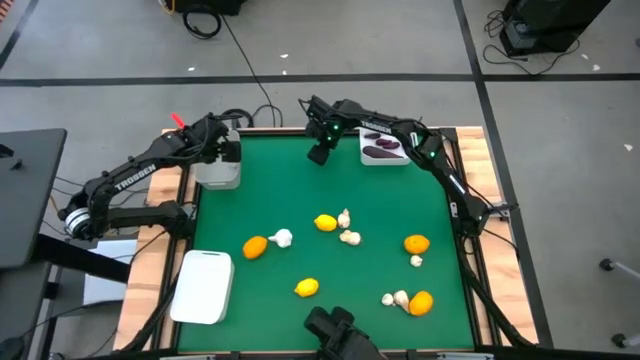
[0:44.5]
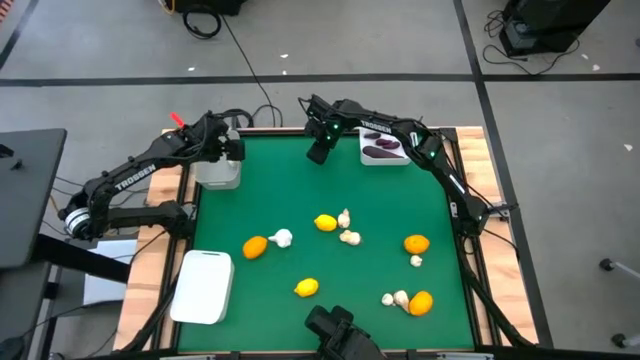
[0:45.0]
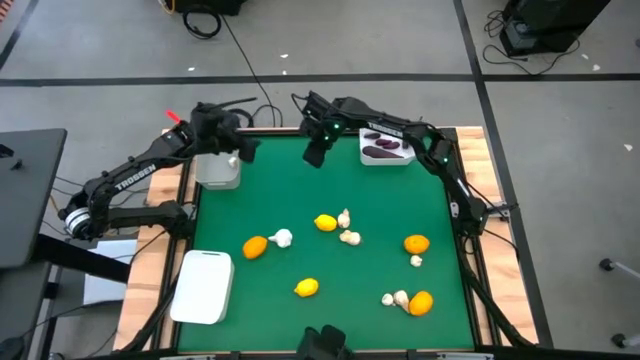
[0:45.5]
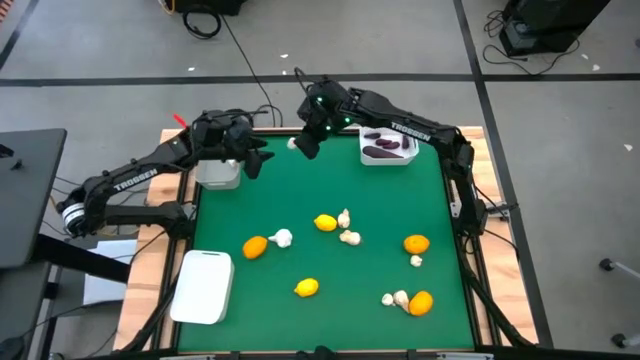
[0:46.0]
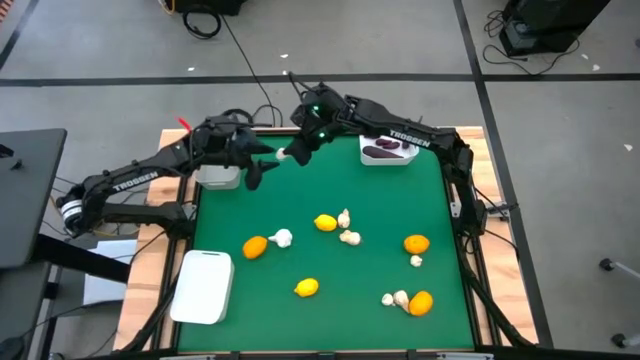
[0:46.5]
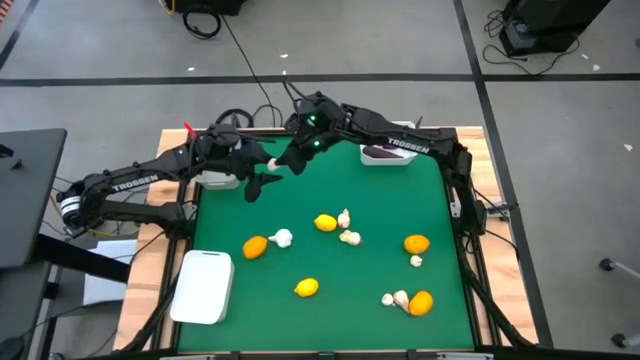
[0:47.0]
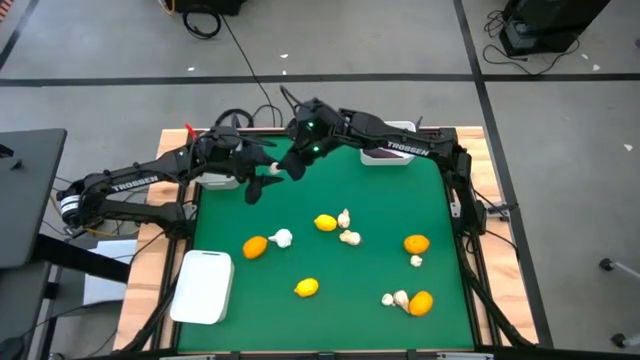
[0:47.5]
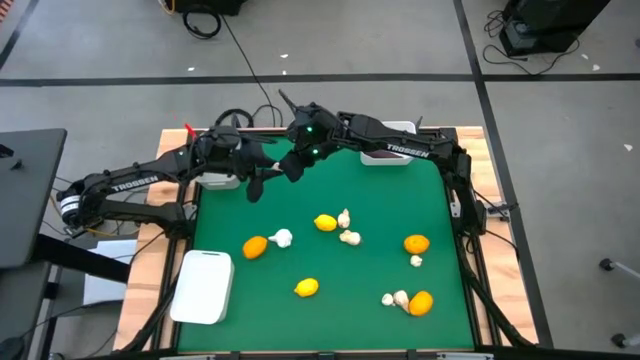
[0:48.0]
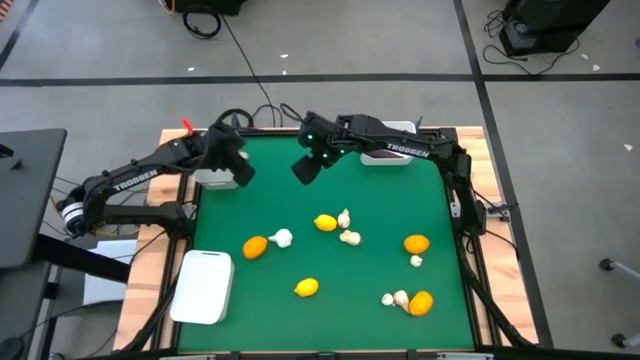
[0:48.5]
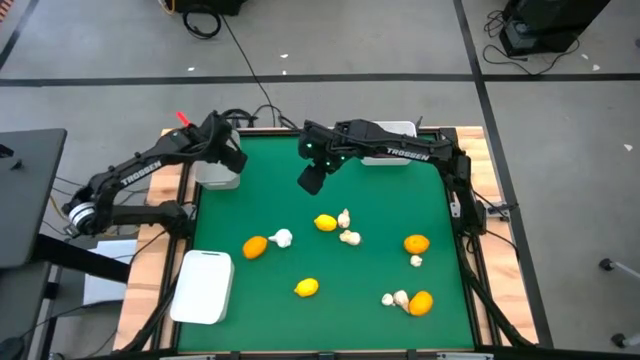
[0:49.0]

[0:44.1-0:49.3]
Task: Sort produce into baskets
Put the garlic into the gray bin

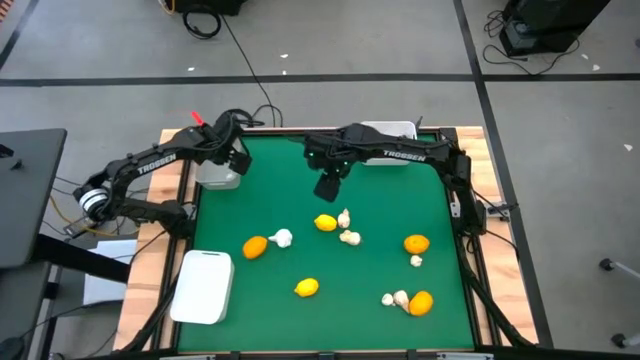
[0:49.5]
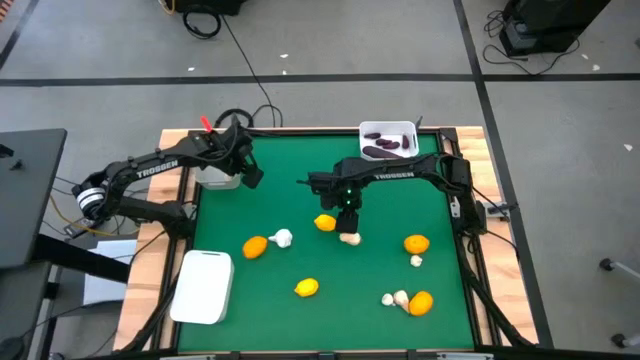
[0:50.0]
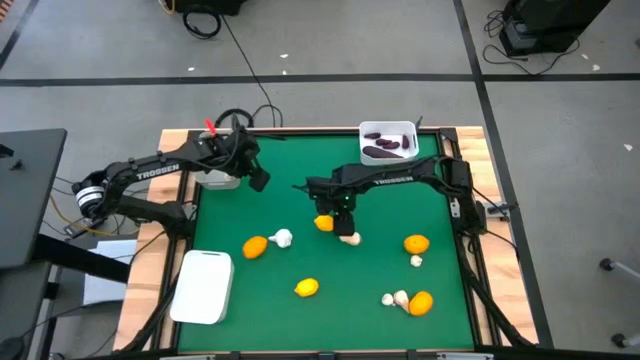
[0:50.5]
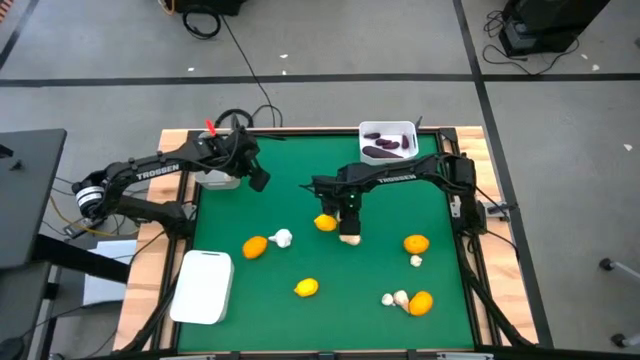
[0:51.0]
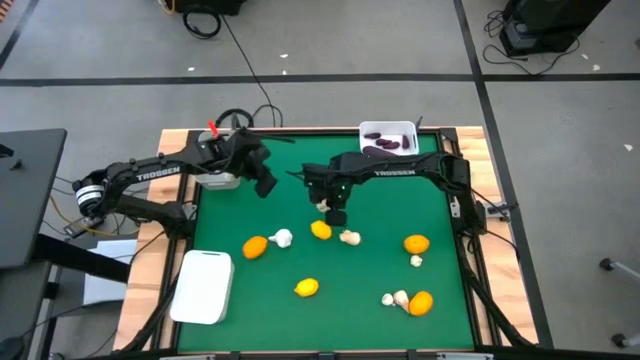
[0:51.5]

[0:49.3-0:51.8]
Put the garlic into the gray bin

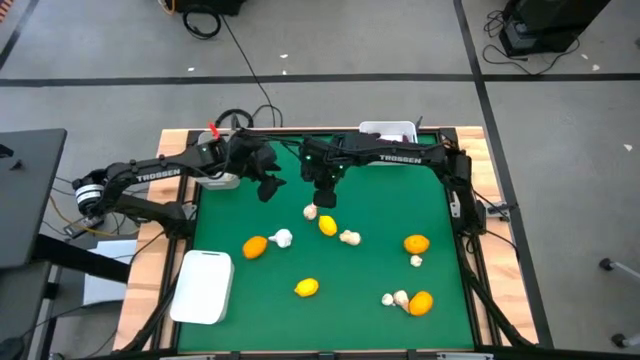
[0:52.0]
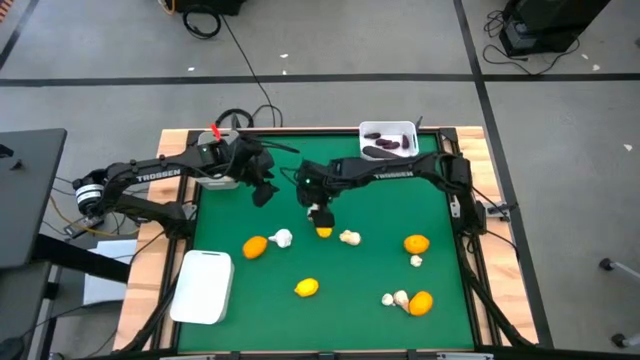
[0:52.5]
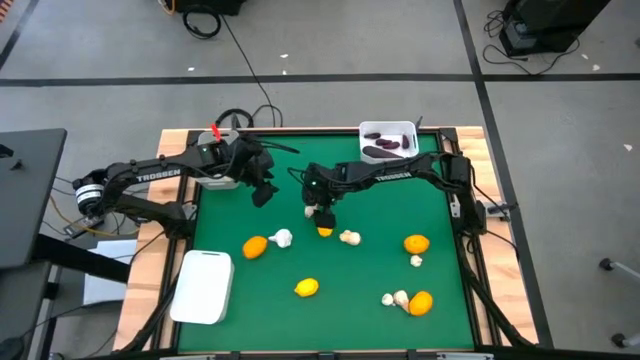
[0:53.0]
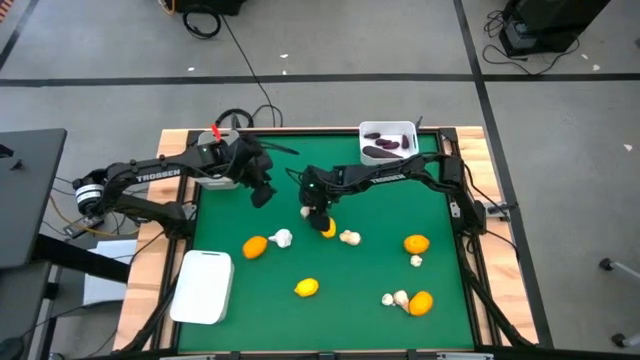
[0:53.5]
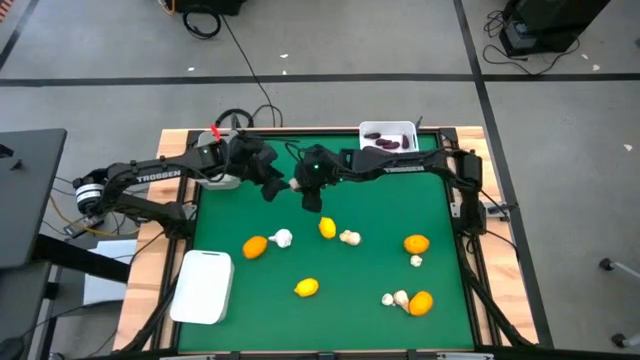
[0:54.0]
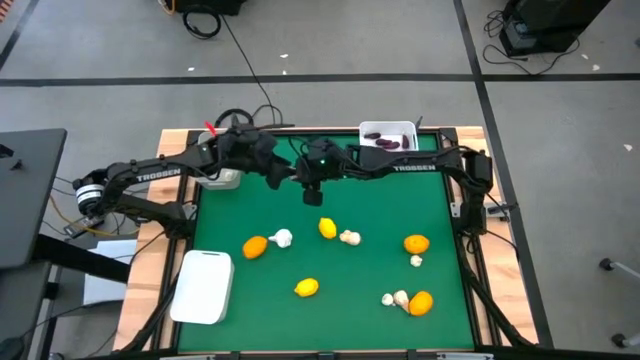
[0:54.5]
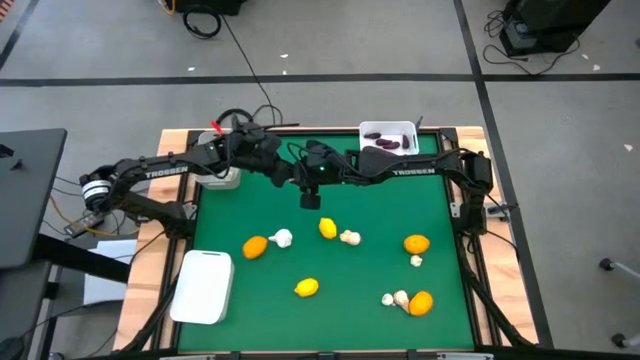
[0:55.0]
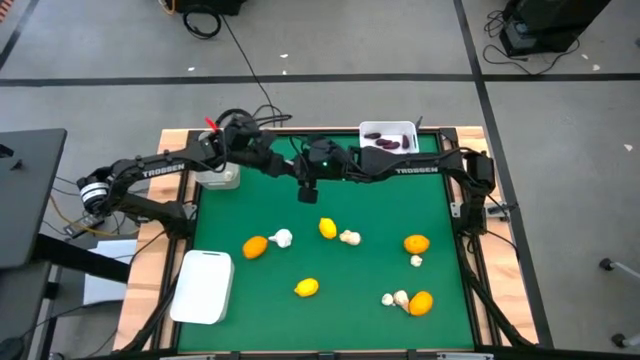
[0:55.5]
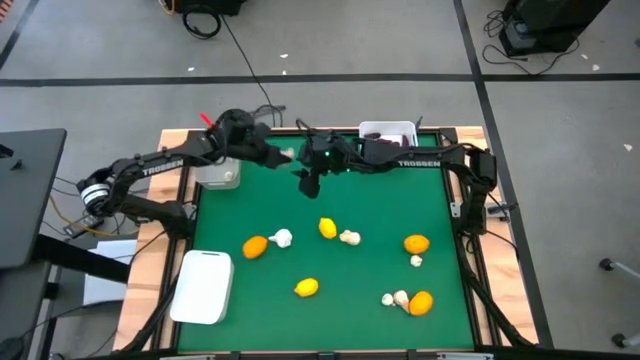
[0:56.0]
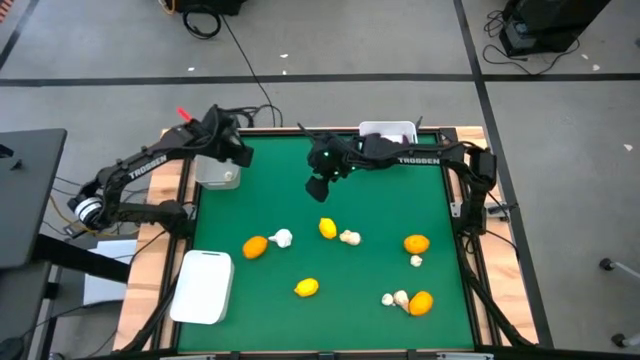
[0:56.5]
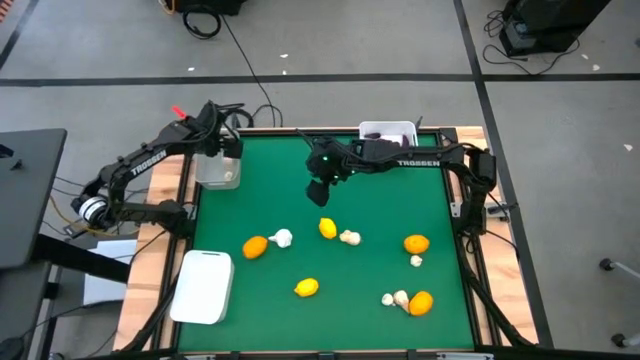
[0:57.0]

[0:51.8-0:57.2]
Put the garlic into the gray bin

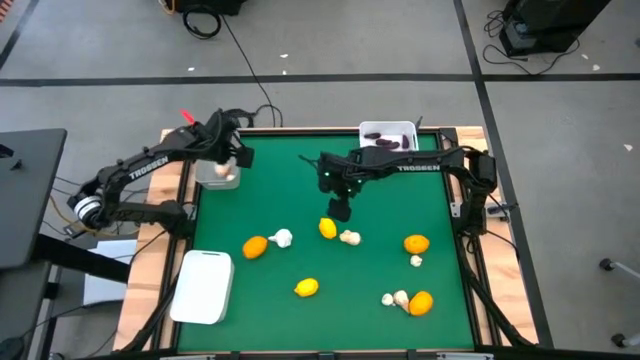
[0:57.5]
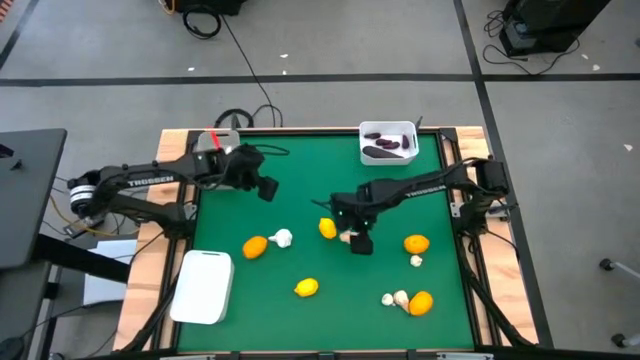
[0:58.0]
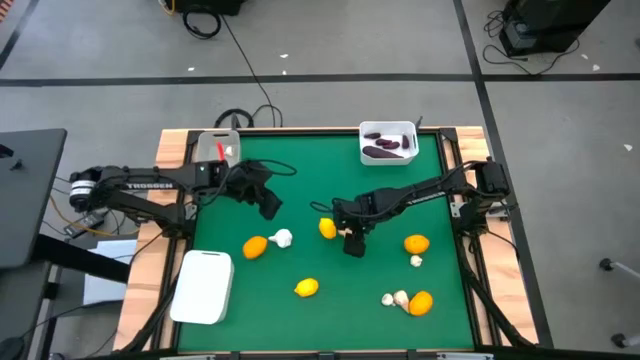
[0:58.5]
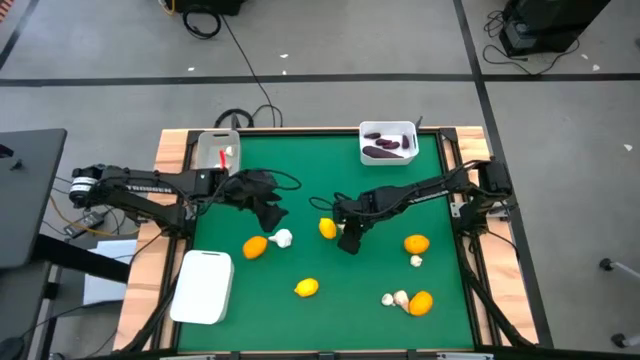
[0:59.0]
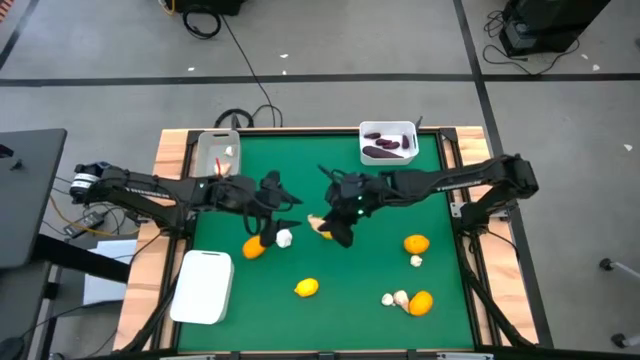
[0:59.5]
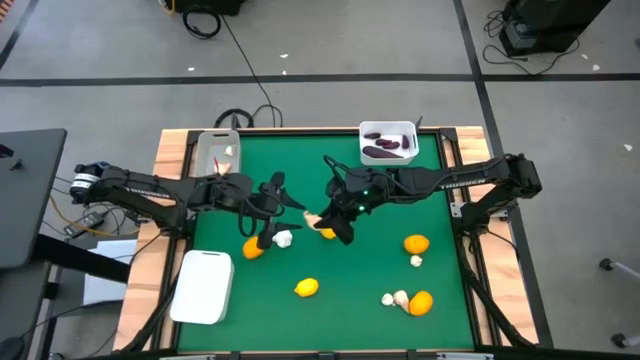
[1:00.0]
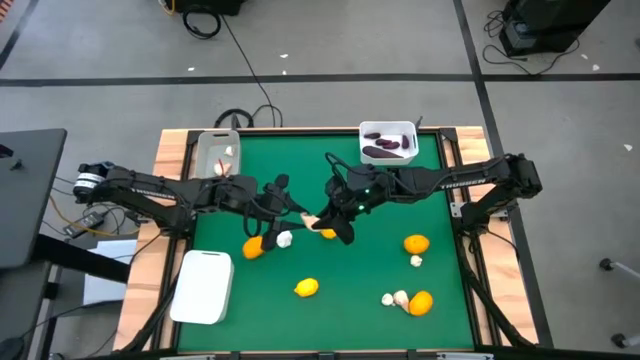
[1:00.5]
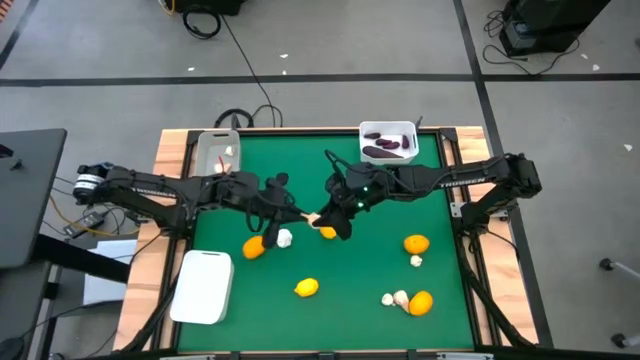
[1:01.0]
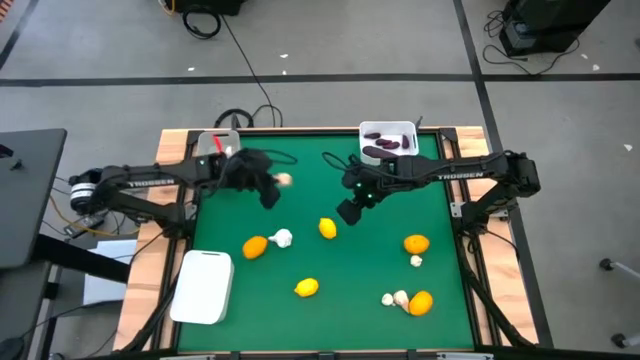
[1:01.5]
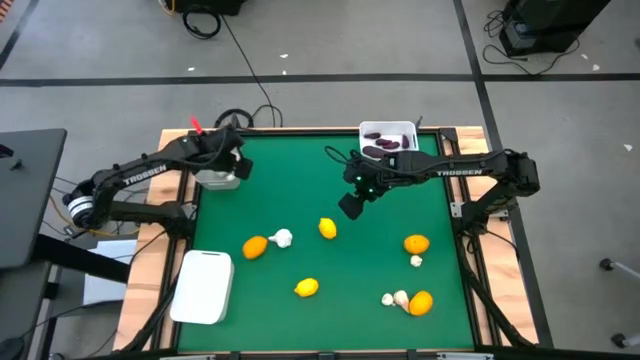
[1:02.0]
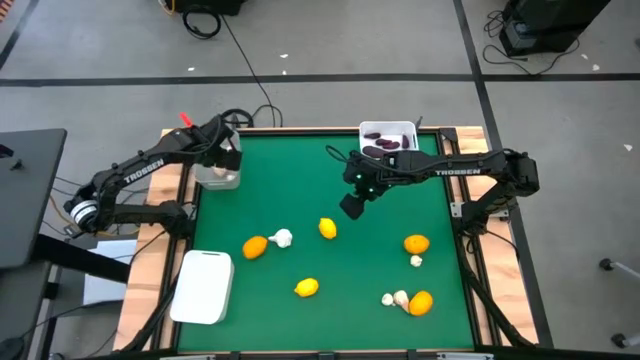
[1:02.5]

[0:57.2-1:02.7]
Put the garlic into the gray bin

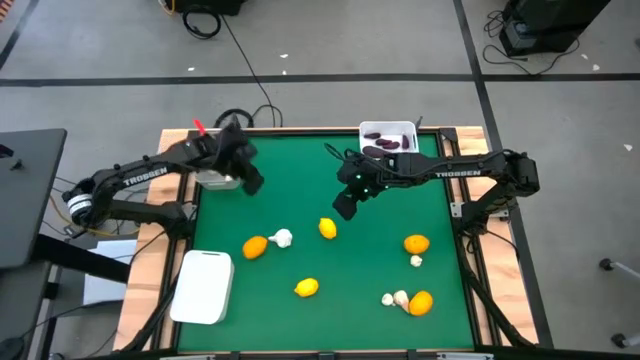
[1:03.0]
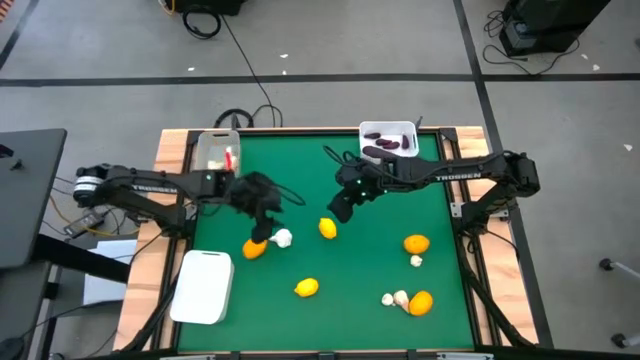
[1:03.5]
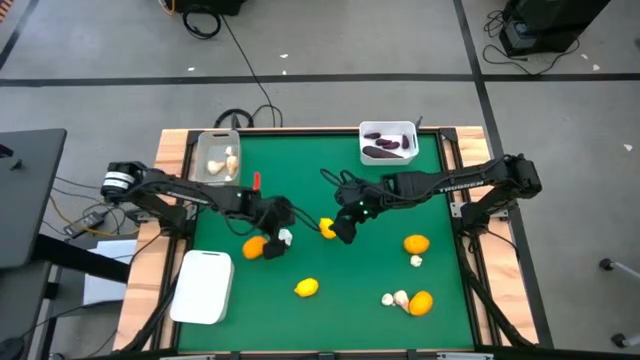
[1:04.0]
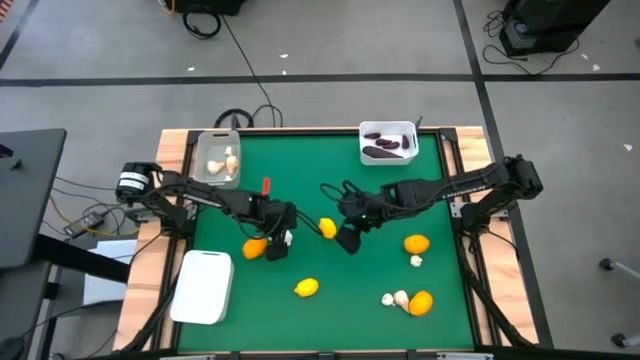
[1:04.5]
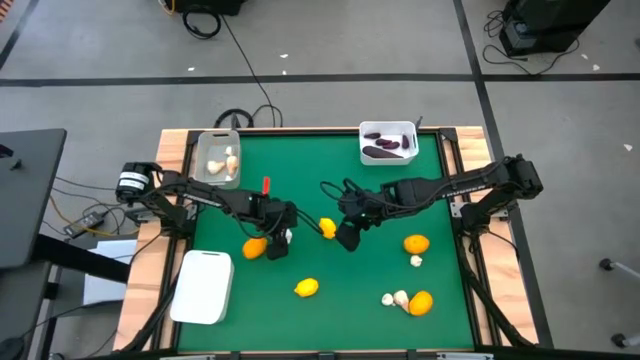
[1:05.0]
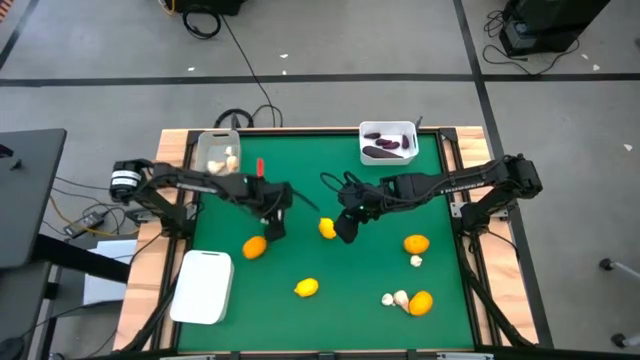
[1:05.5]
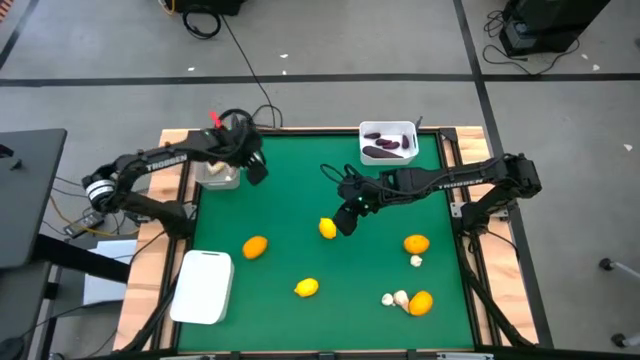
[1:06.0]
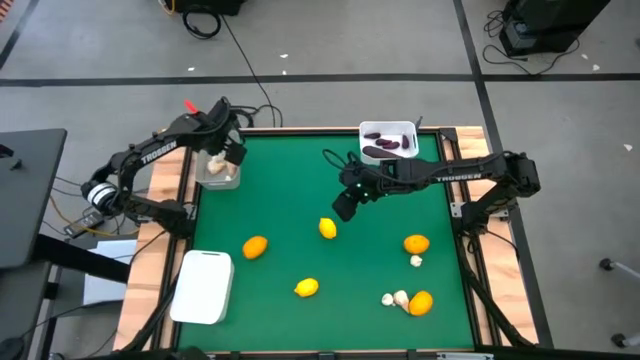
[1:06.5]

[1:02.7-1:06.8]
Put the garlic into the gray bin
